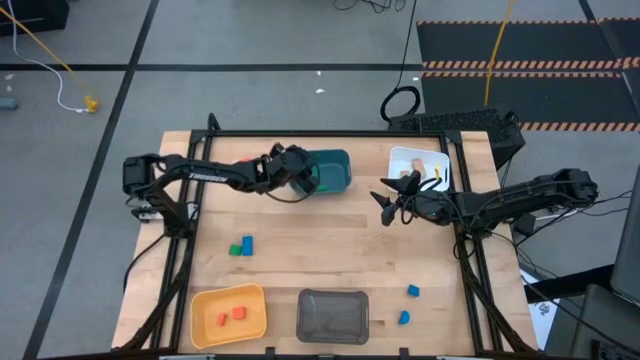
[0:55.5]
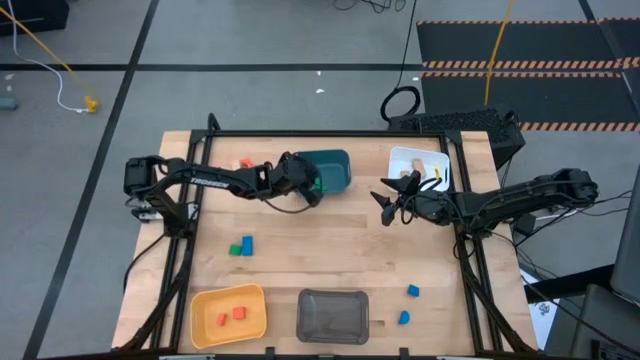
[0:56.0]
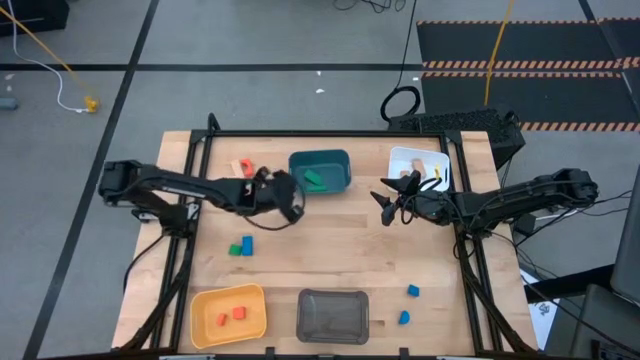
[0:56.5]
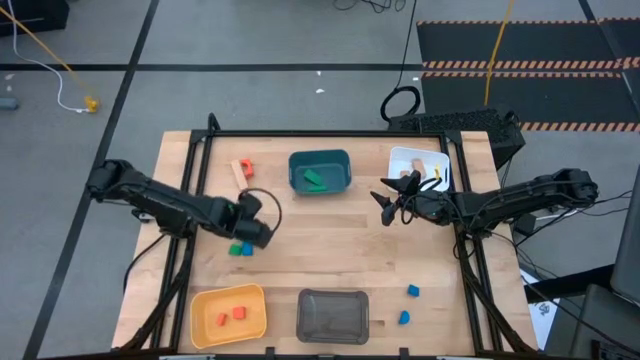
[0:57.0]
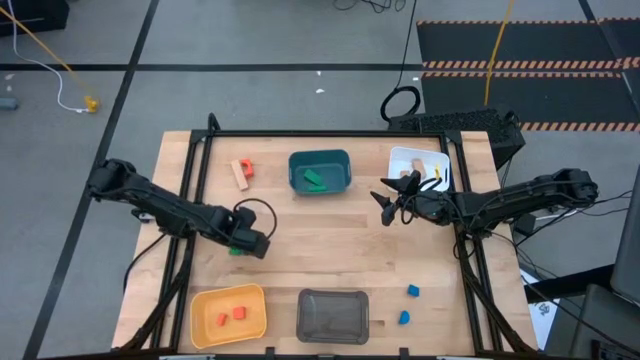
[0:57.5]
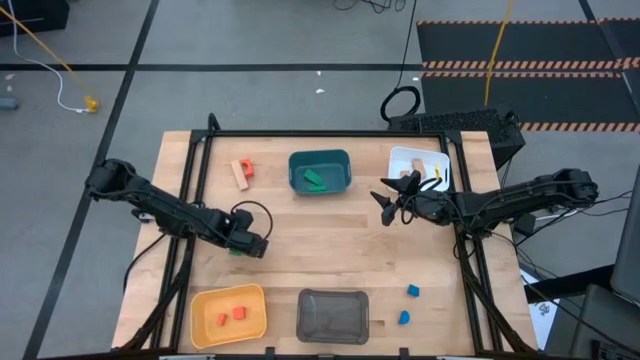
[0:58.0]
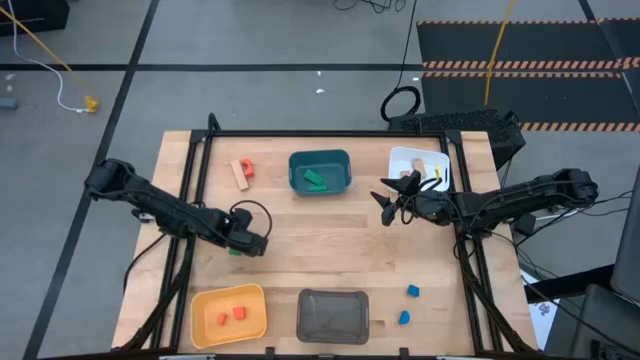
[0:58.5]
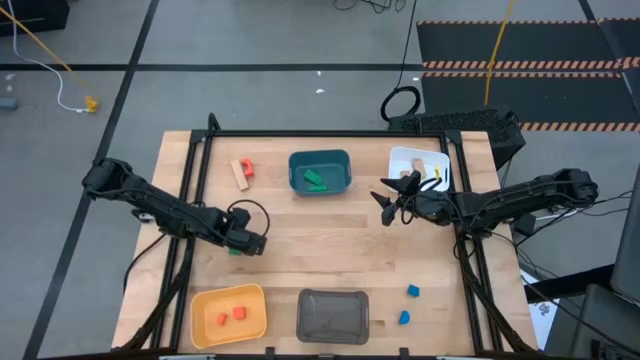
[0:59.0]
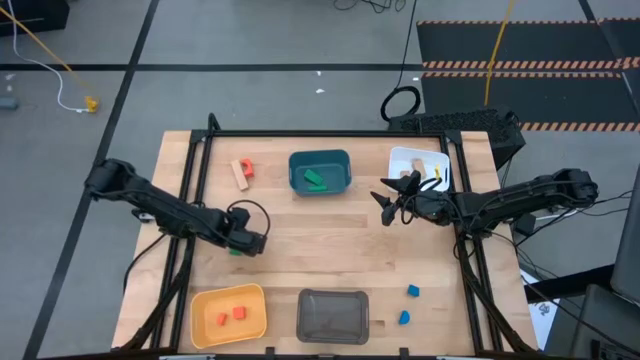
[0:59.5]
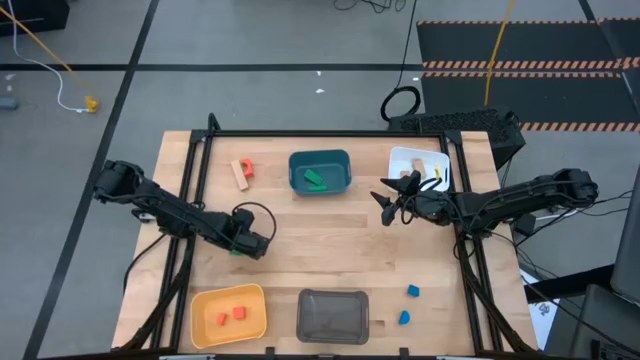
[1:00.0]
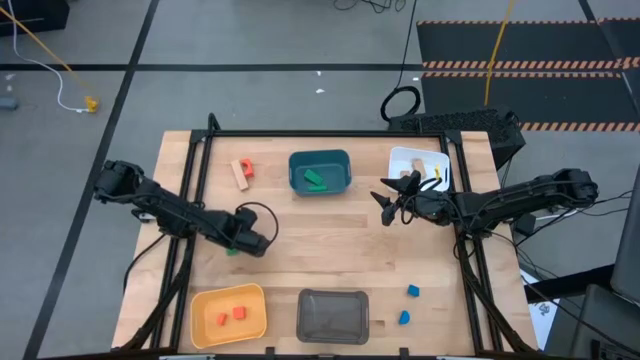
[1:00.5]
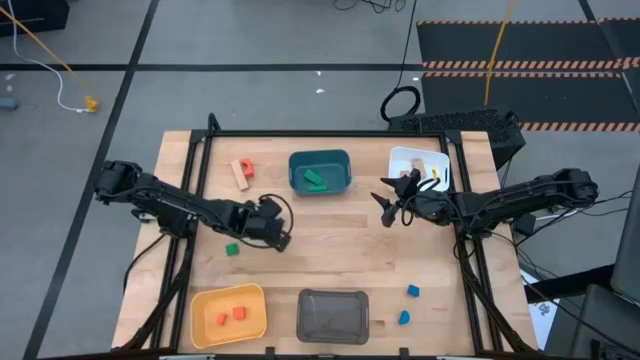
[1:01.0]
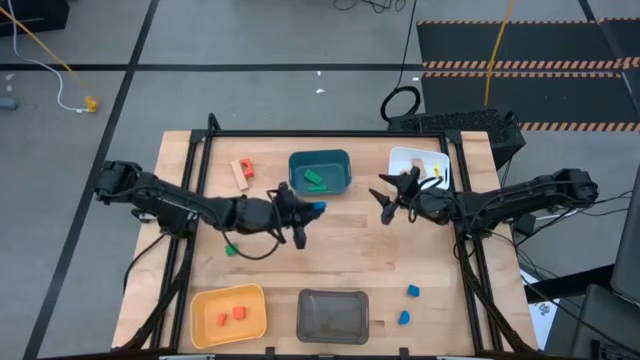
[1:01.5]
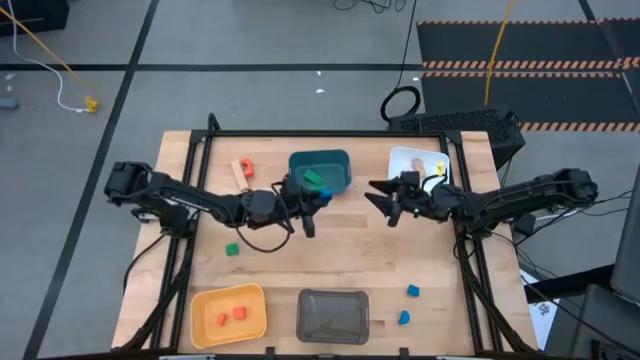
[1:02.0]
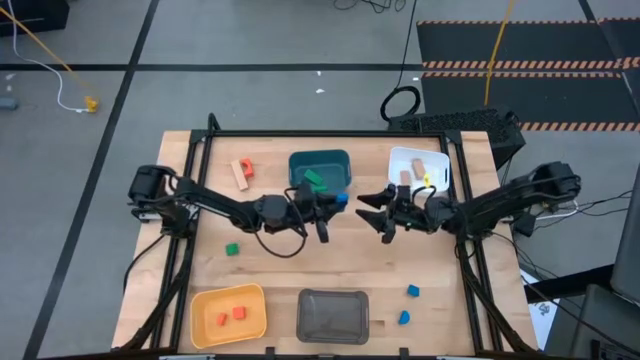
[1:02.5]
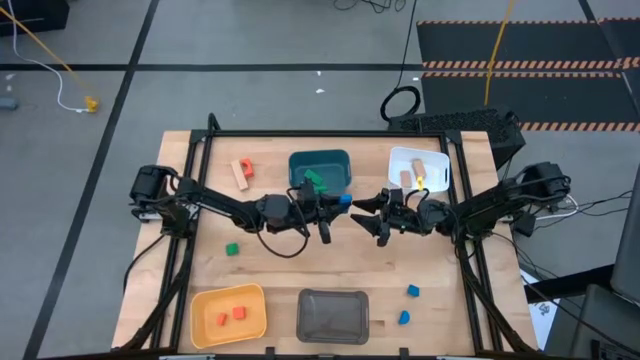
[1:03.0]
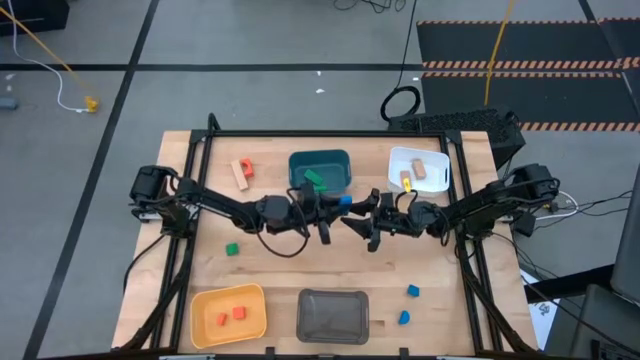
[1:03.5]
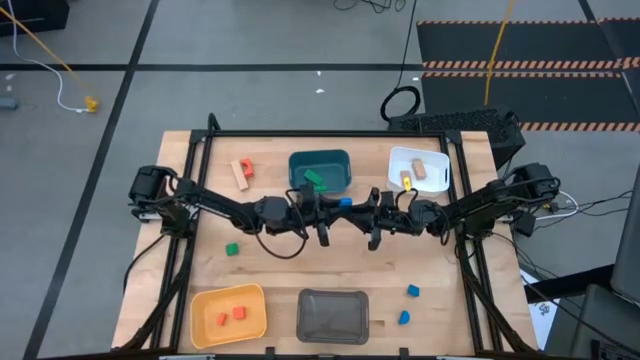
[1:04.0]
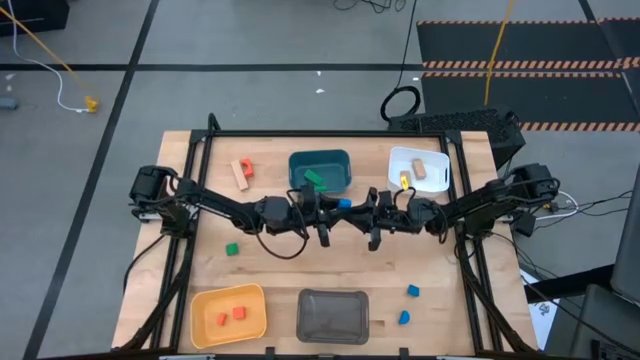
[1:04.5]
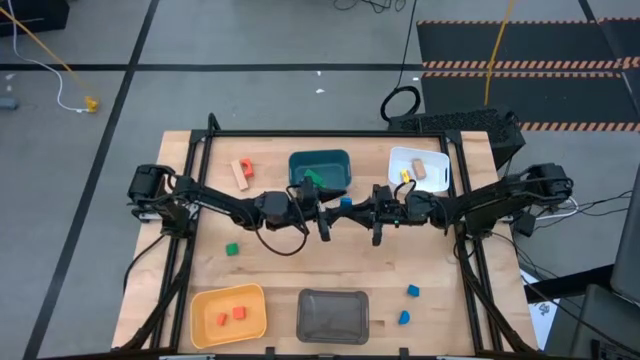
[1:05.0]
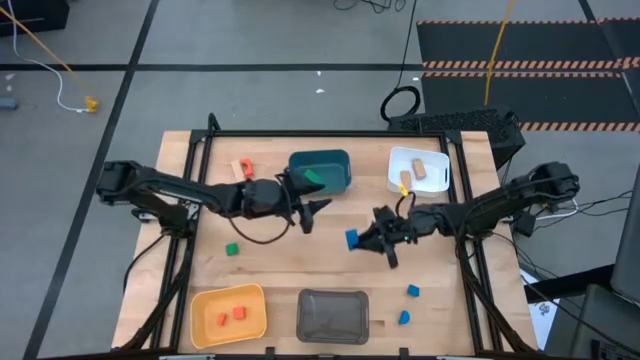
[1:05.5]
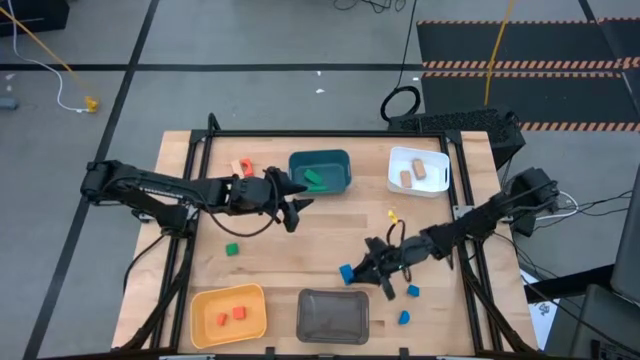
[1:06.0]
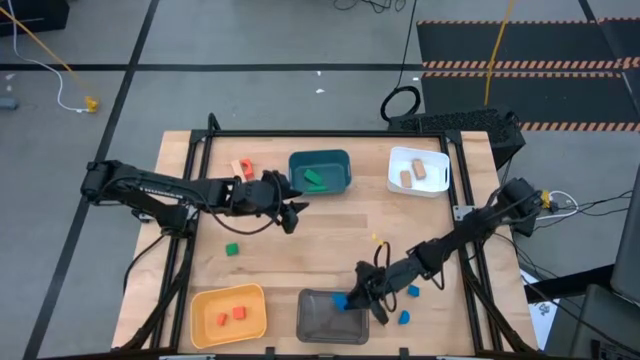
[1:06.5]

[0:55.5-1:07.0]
Task: Sort & place blocks by color
Put the top left blue block into the black bin

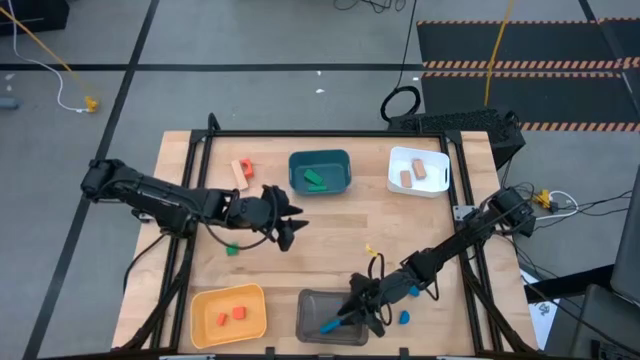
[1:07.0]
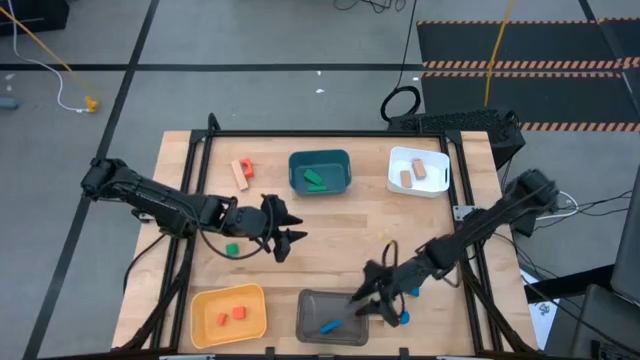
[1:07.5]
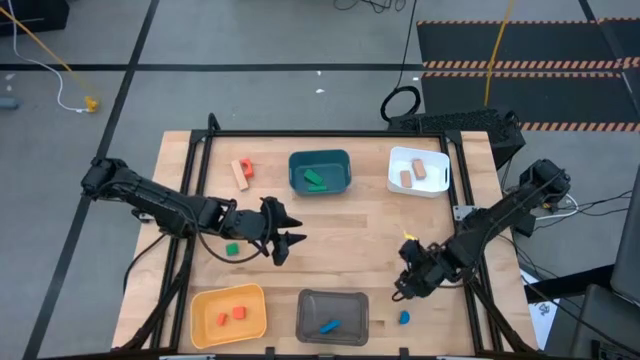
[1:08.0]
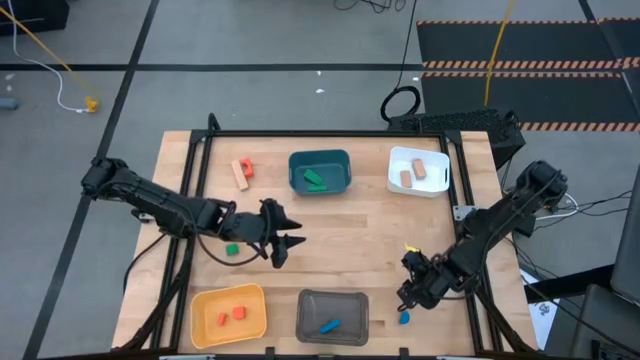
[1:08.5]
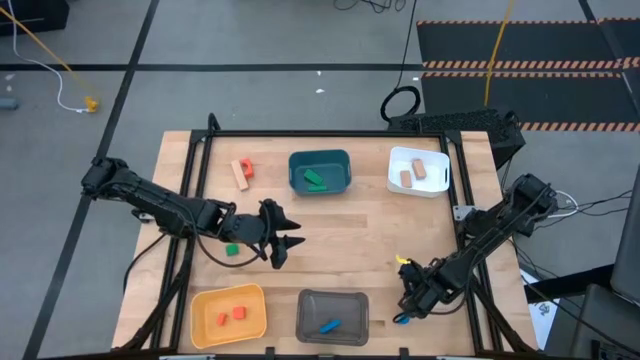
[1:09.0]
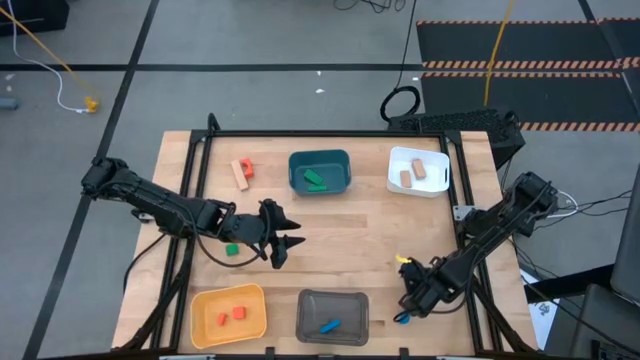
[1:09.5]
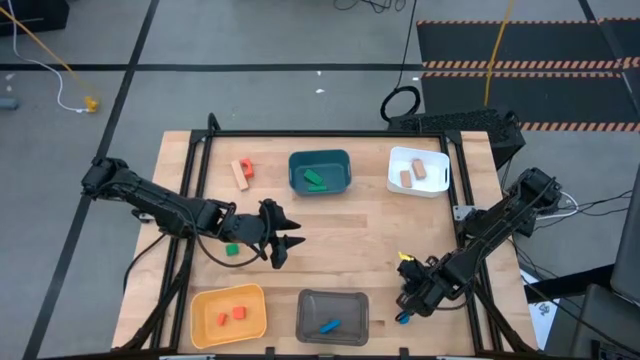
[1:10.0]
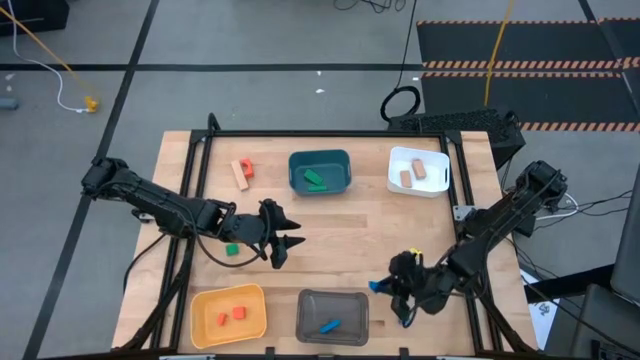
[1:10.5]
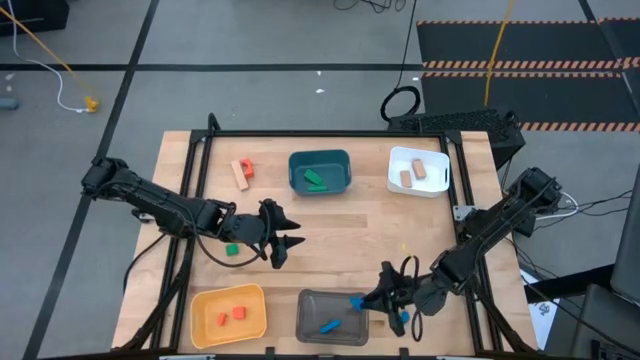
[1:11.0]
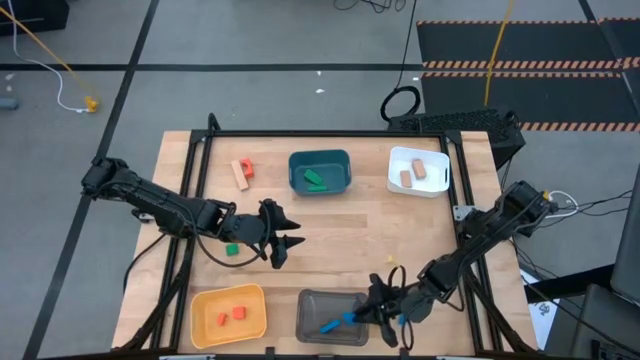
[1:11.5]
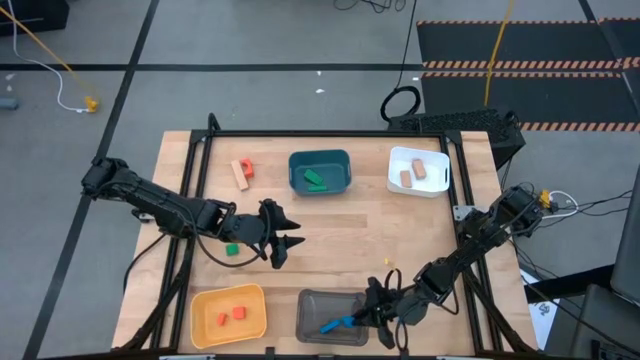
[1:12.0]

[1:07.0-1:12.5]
Put the top blue block into the black bin

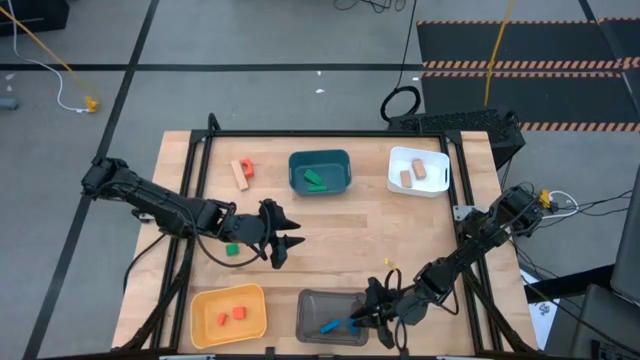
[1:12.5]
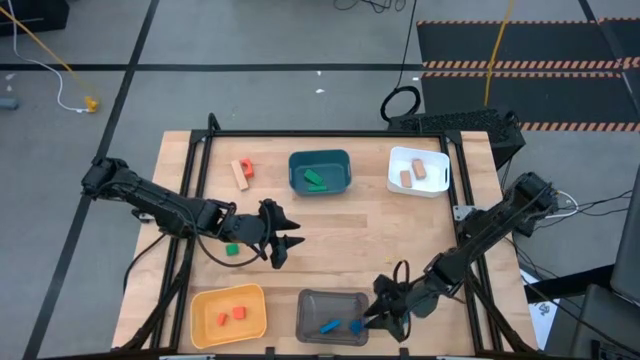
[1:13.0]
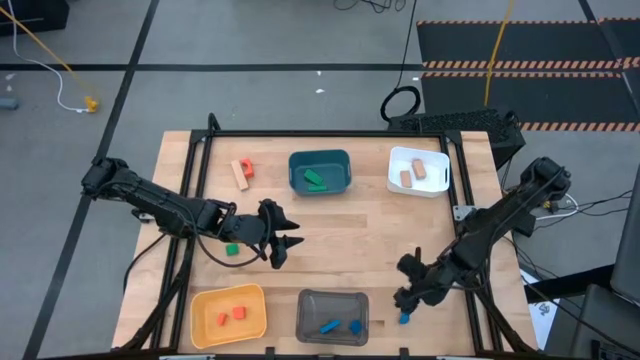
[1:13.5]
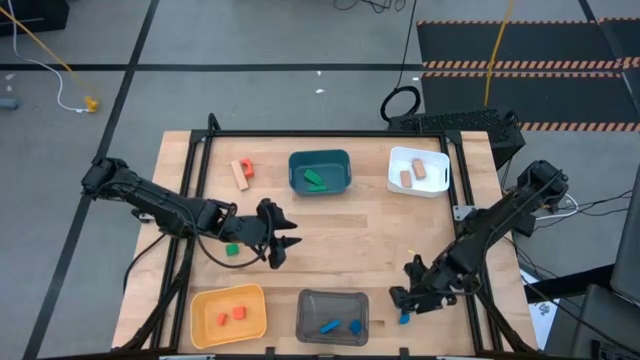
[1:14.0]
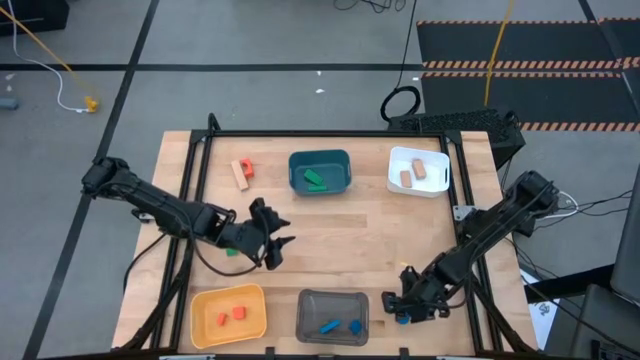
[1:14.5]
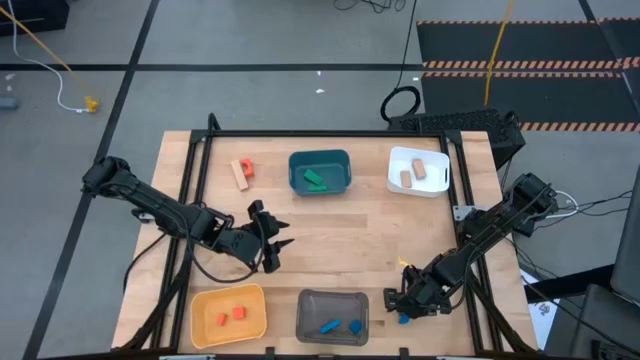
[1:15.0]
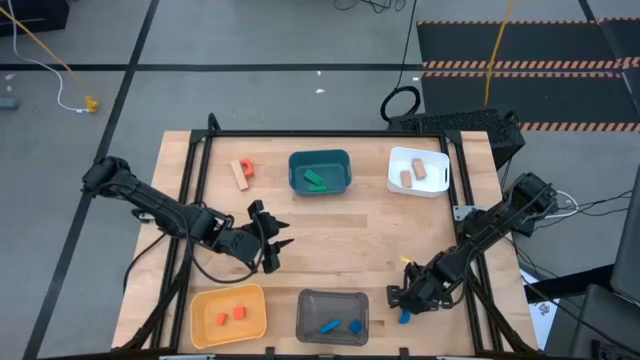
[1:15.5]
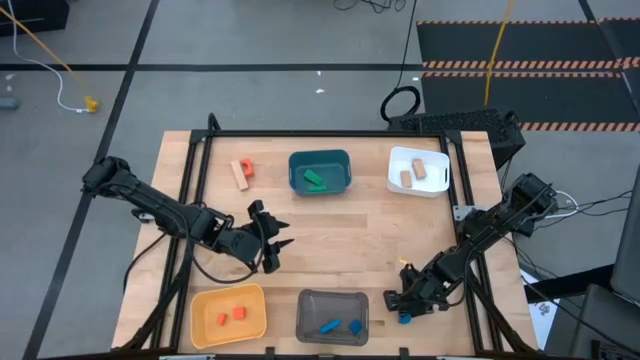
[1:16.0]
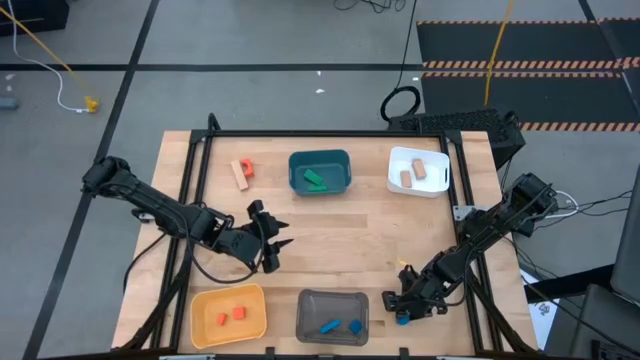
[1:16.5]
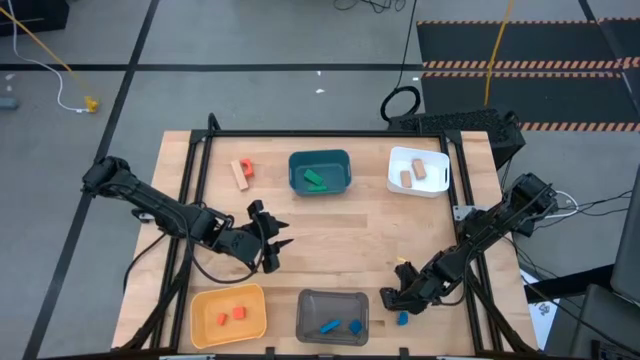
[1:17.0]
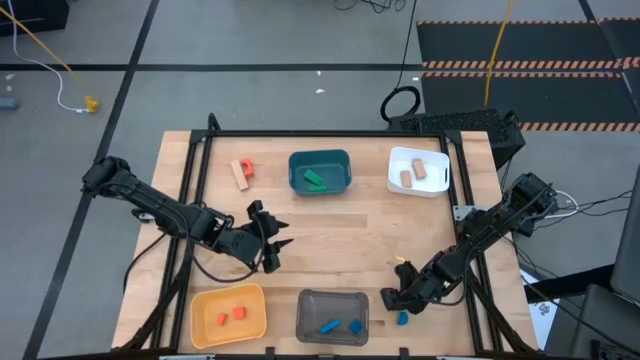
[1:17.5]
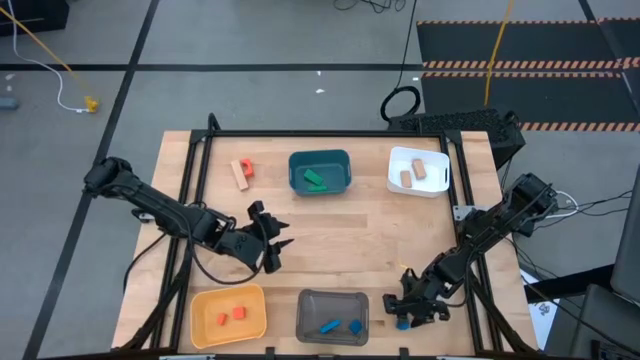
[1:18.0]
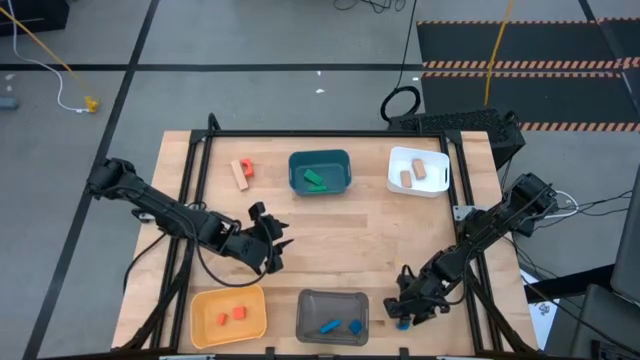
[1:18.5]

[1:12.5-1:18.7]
Put the blue block into the black bin
